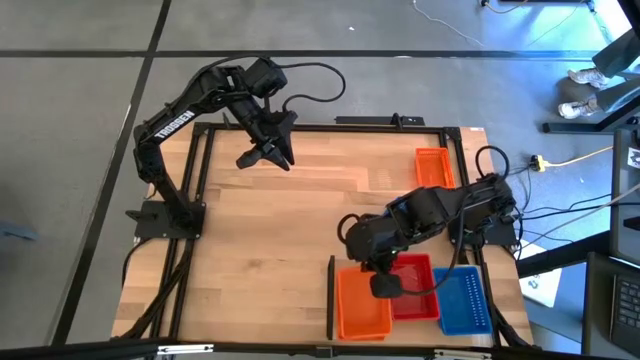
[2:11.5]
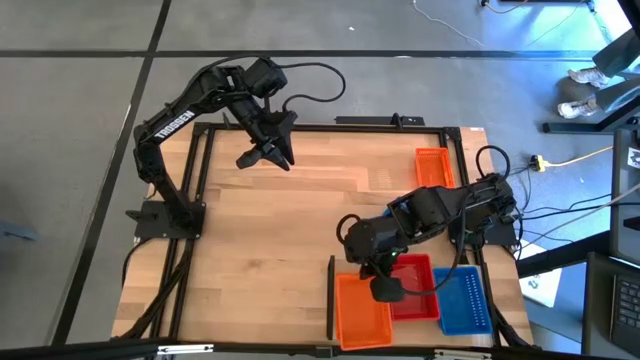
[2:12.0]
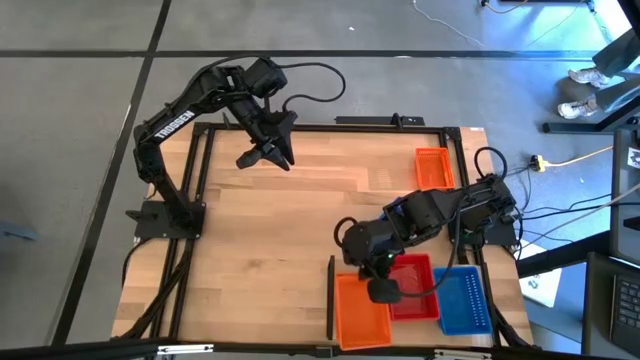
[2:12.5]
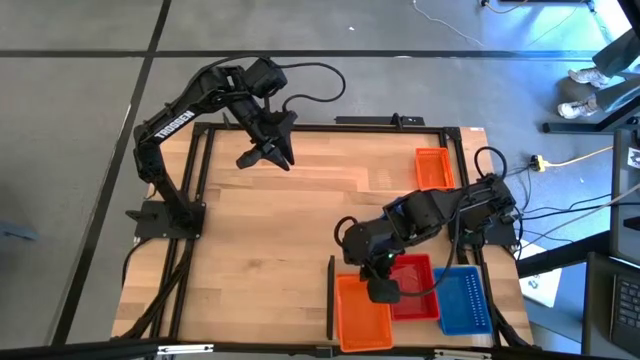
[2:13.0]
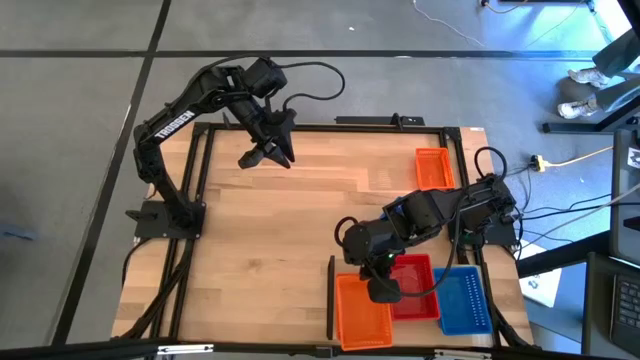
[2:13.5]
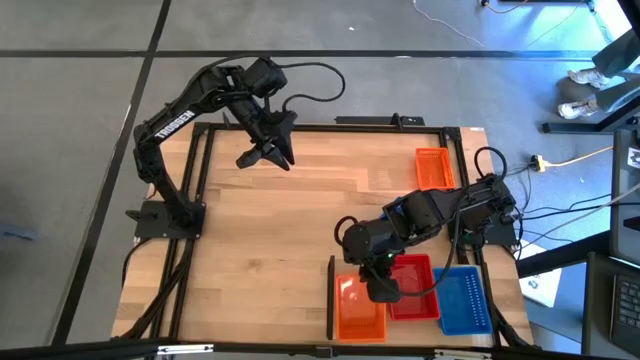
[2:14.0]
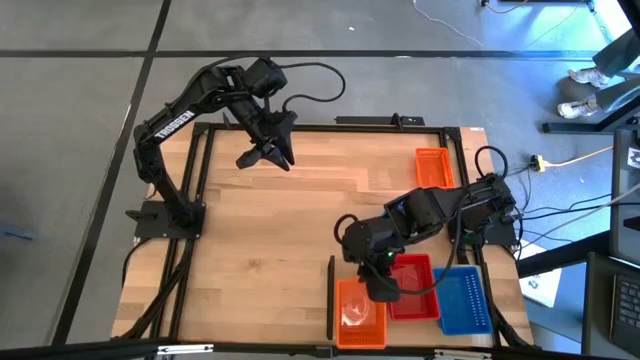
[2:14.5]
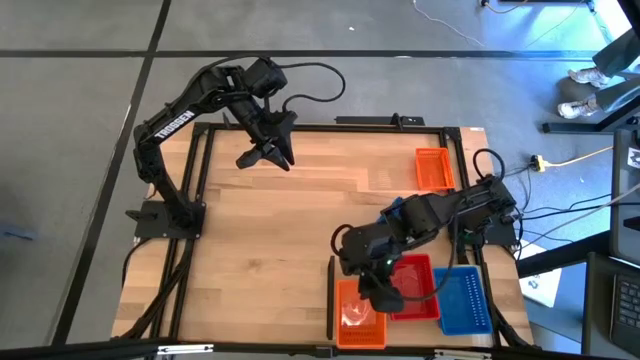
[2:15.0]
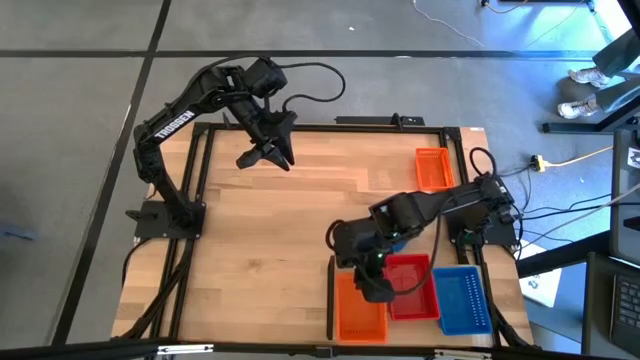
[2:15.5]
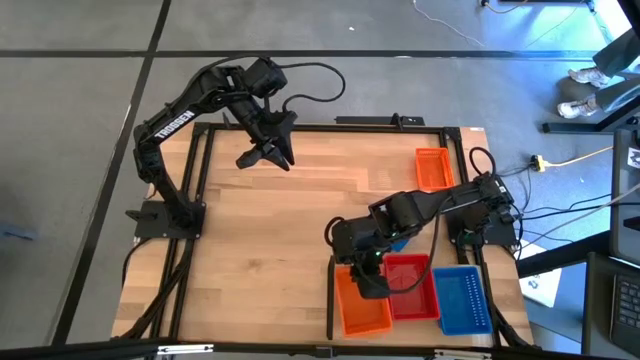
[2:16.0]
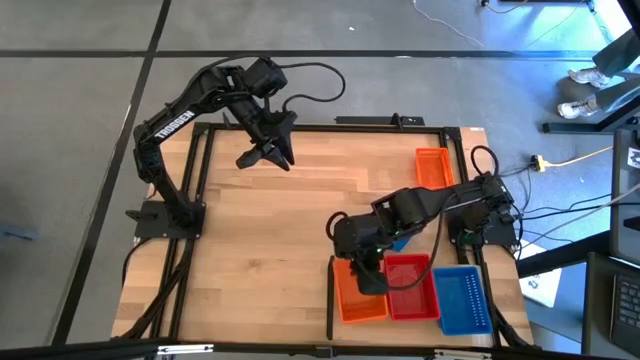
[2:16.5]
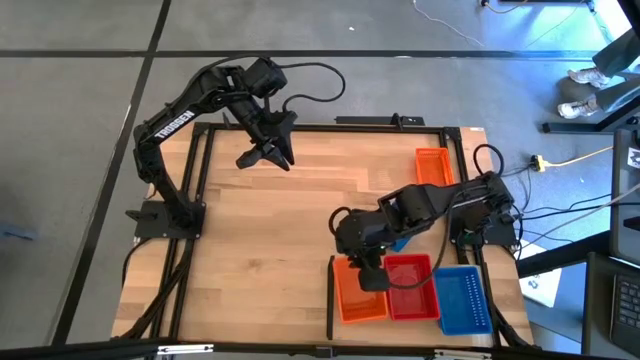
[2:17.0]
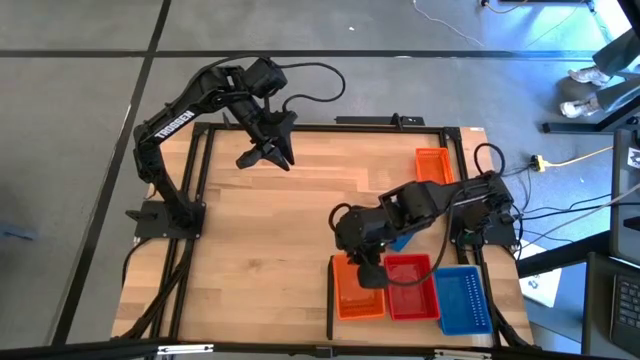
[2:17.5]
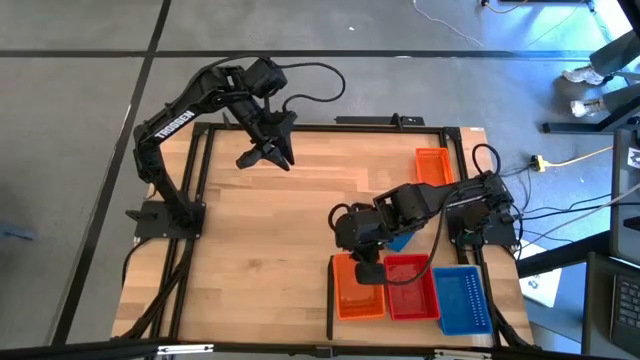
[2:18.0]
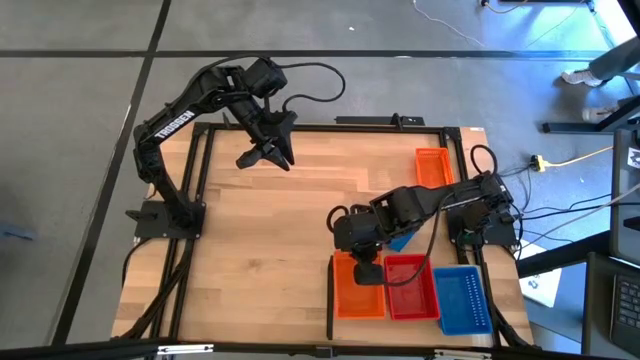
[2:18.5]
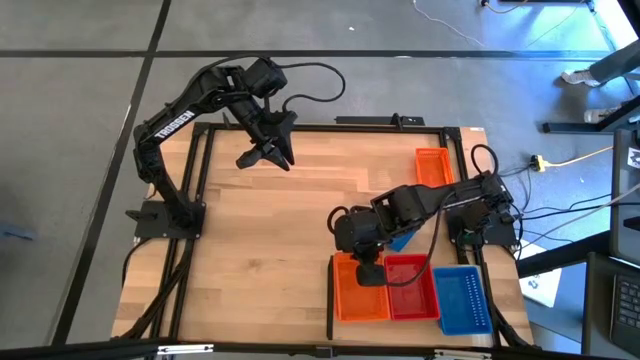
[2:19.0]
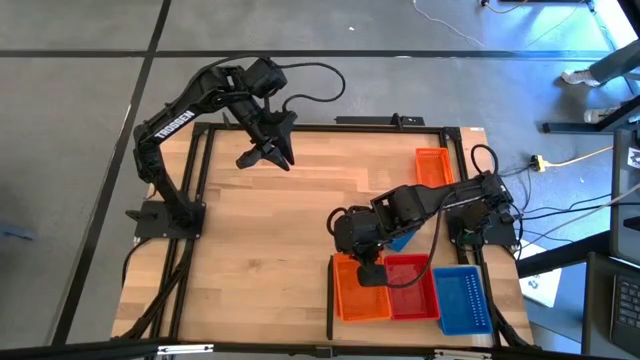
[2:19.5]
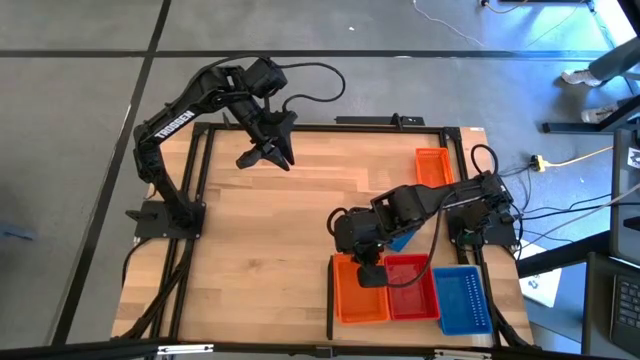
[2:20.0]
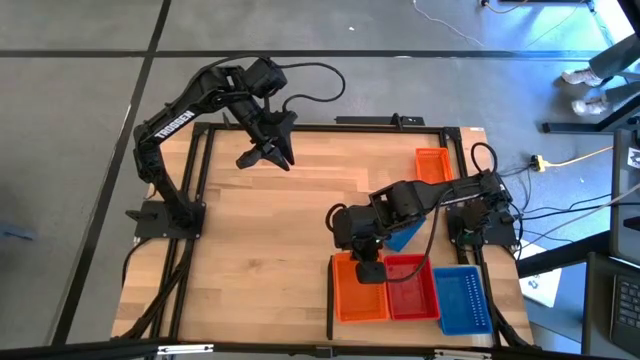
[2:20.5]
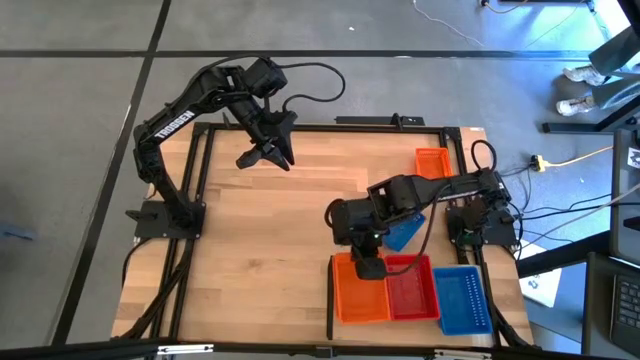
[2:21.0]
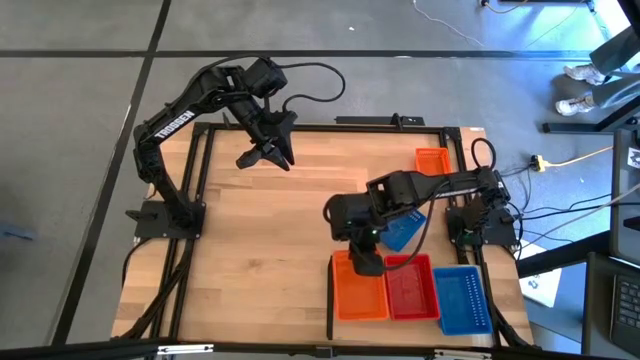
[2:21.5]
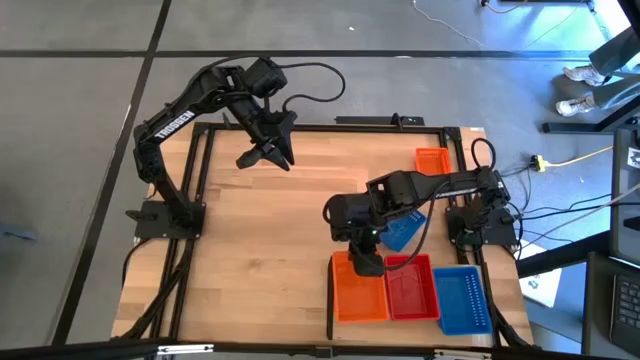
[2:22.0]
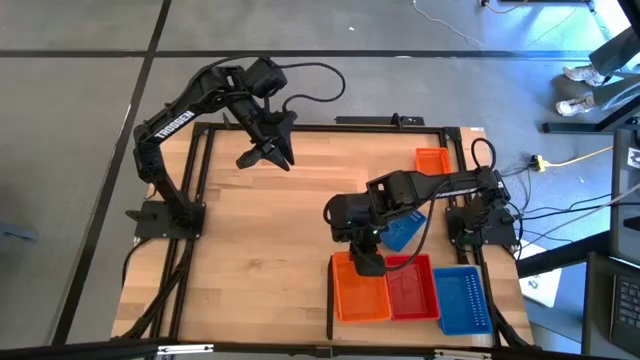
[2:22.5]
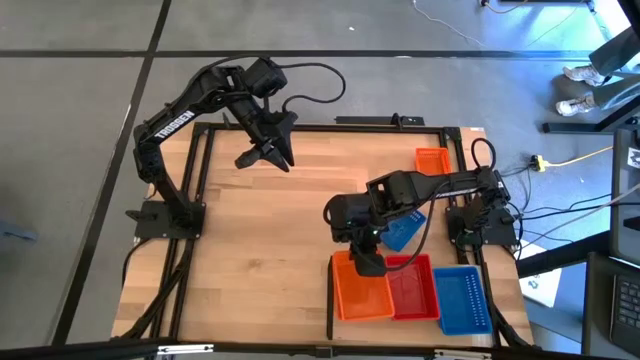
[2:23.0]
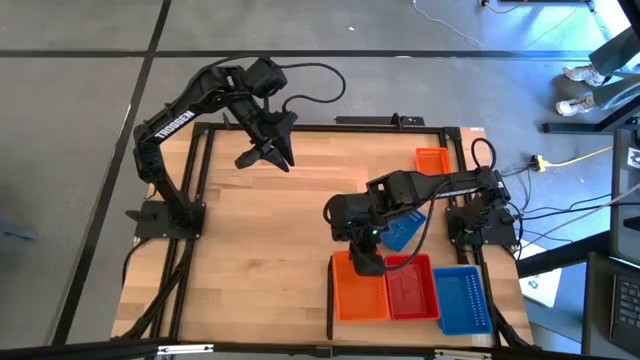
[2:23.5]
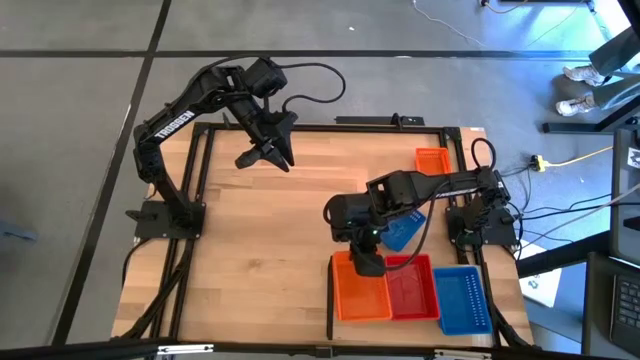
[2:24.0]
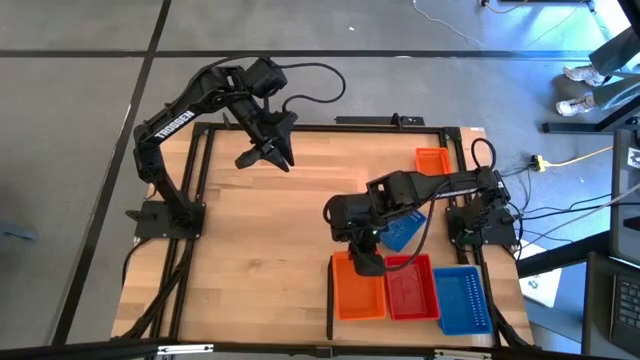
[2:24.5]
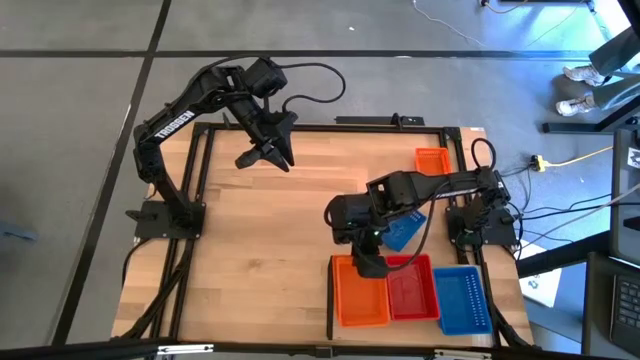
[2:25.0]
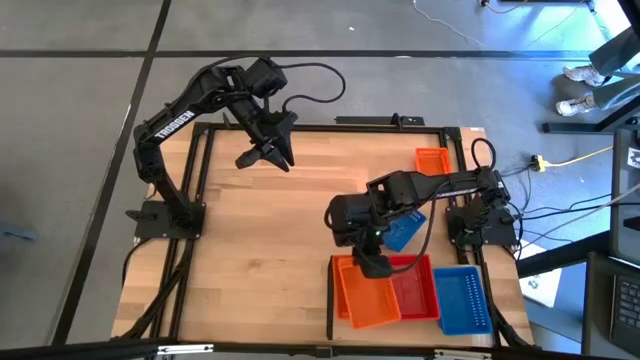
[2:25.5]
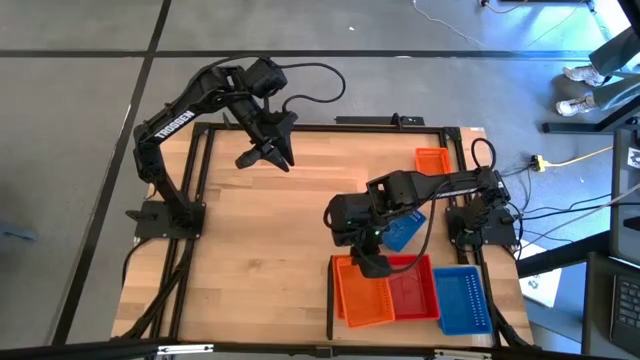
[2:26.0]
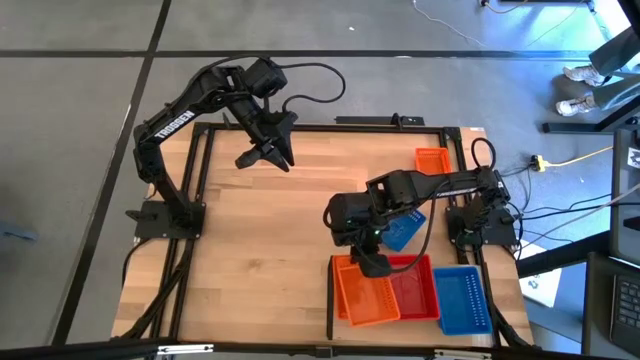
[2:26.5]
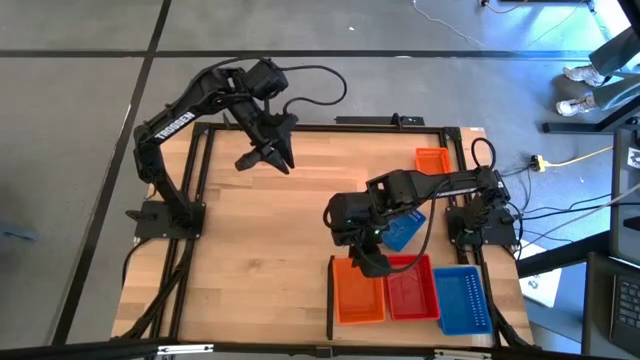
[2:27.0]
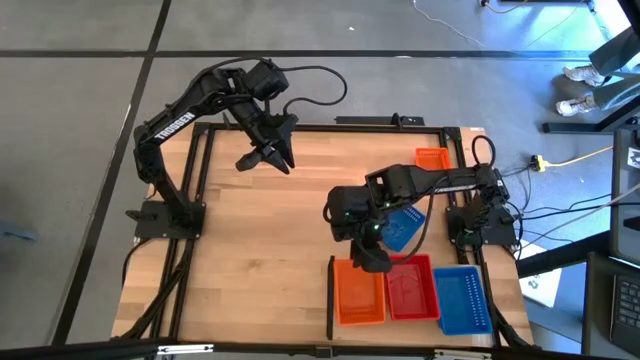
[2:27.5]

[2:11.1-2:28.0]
Task: Stack baskets on shelf by color
Stack the left orange basket on top of the orange basket on the shelf

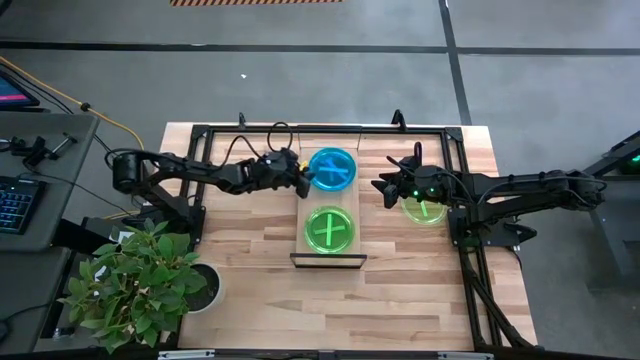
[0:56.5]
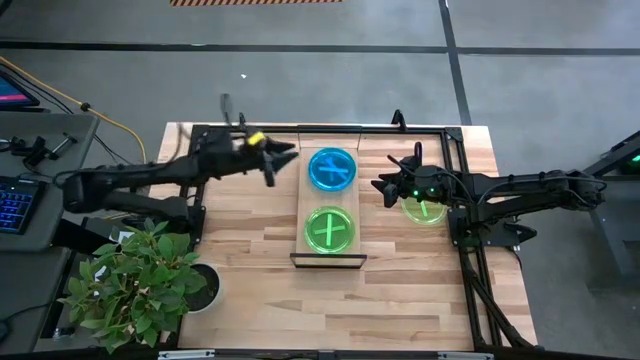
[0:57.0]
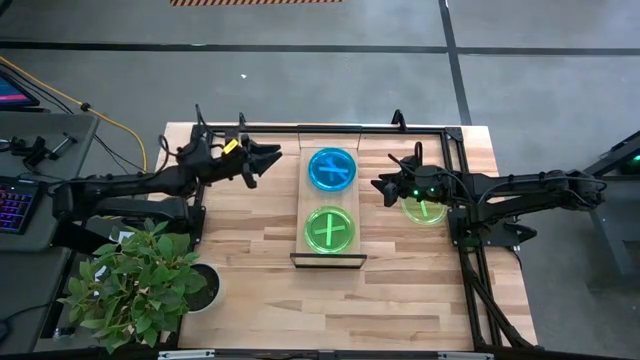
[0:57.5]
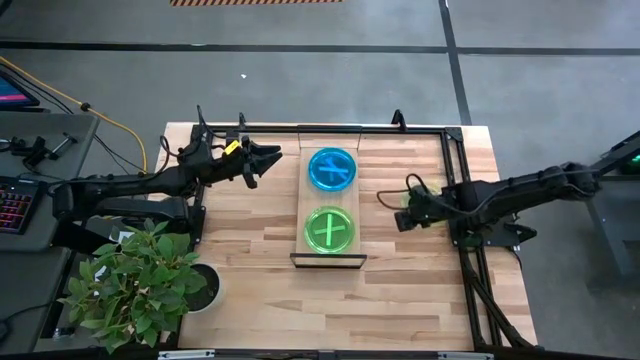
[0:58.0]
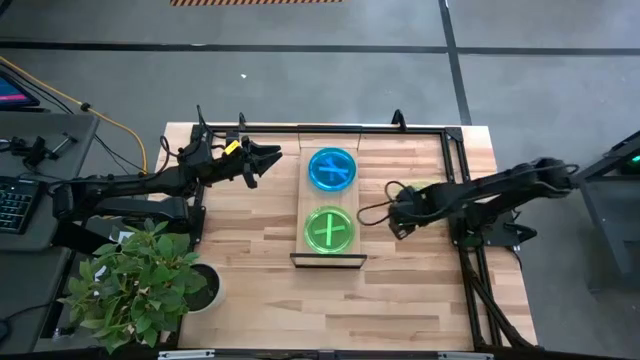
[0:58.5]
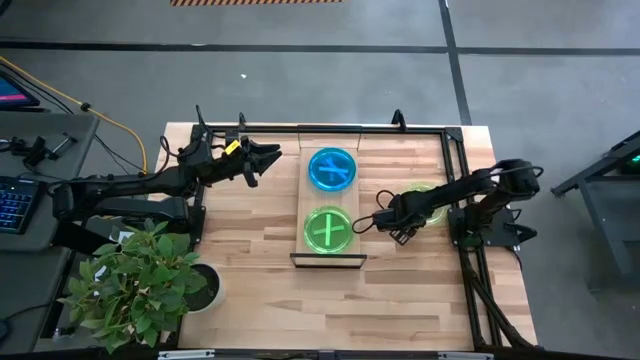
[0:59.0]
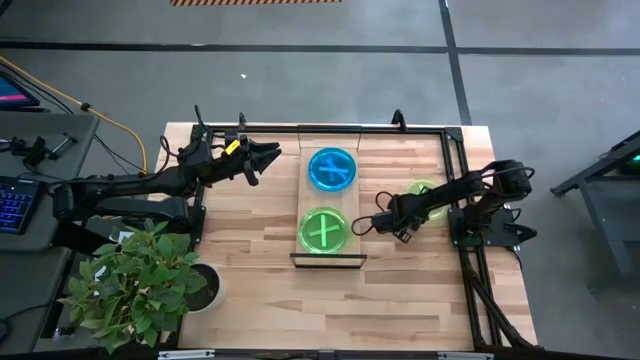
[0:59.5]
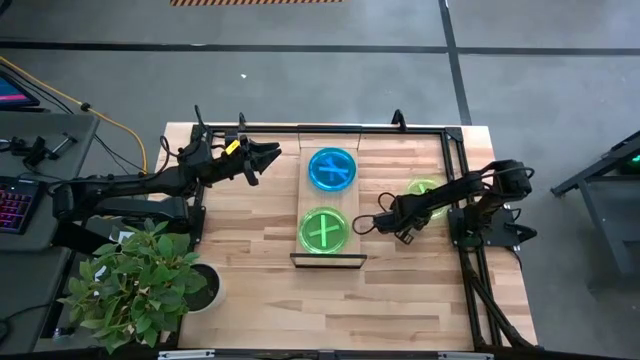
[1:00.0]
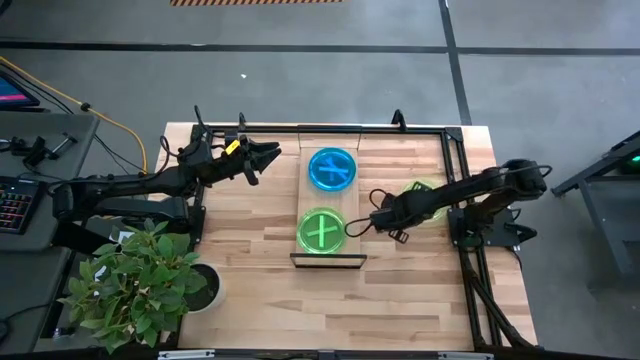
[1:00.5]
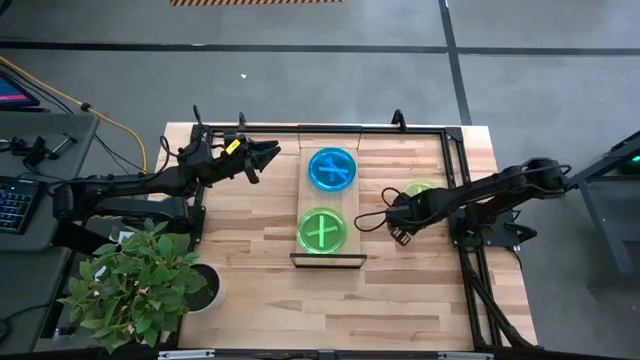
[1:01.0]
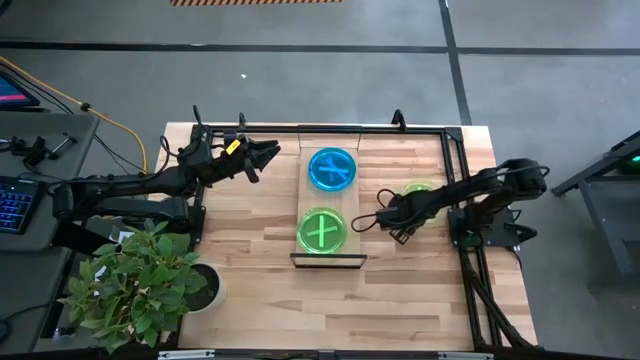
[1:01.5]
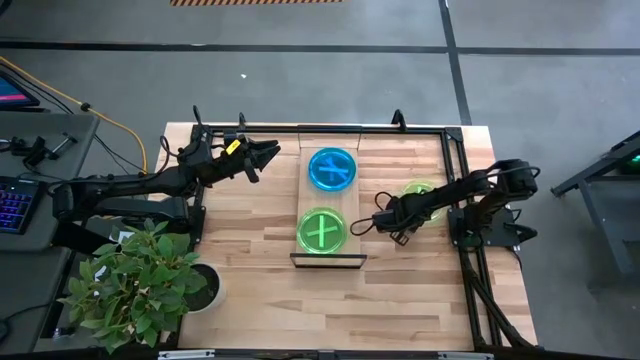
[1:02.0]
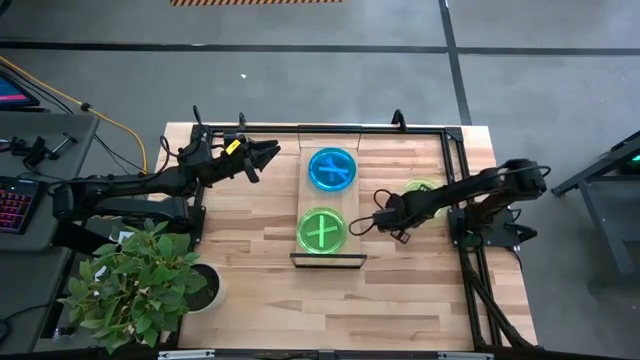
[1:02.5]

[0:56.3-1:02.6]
Task: Place and stack plates onto a shelf
Stack the green plate on top of the green plate on the shelf
